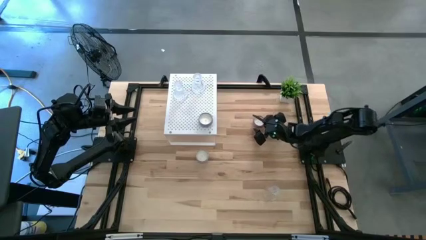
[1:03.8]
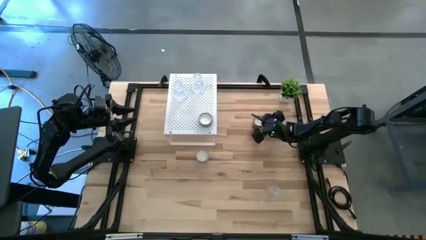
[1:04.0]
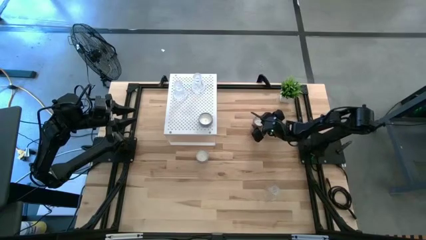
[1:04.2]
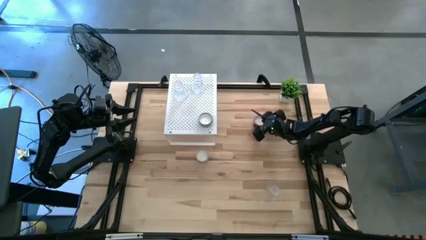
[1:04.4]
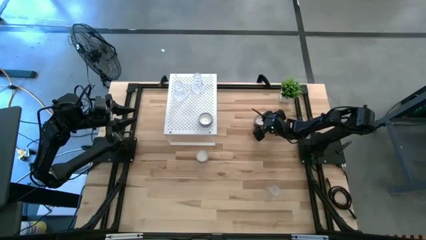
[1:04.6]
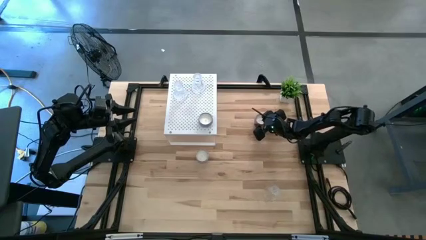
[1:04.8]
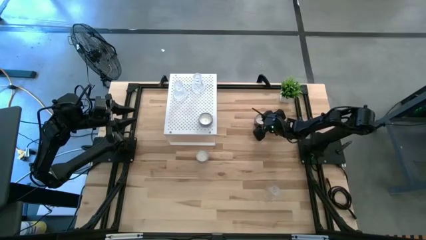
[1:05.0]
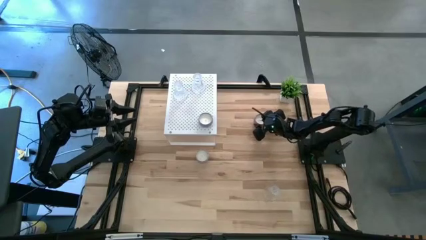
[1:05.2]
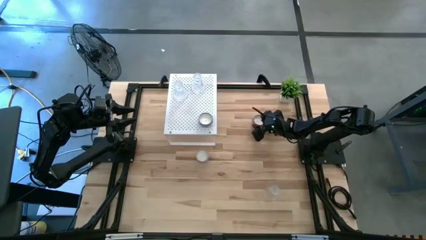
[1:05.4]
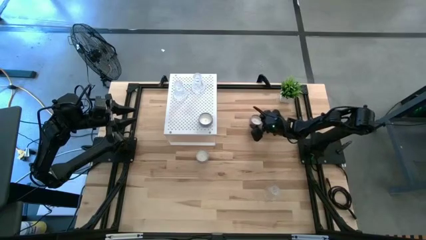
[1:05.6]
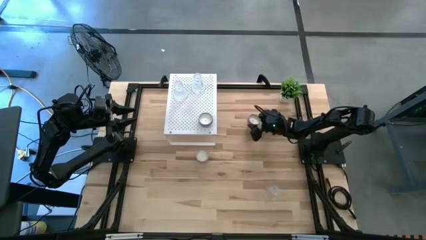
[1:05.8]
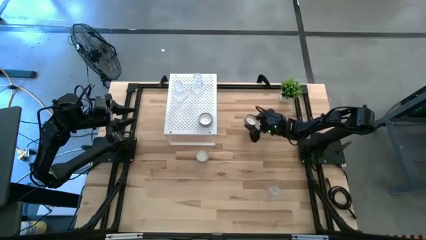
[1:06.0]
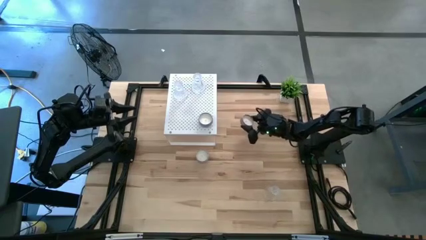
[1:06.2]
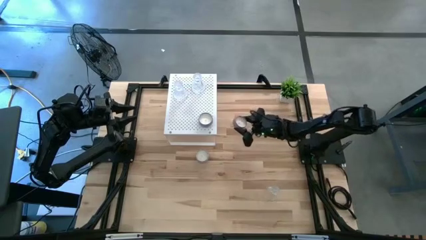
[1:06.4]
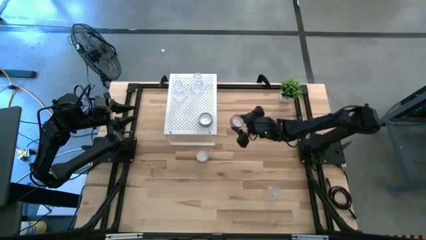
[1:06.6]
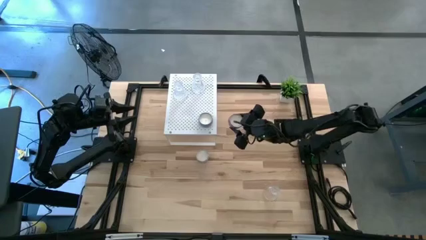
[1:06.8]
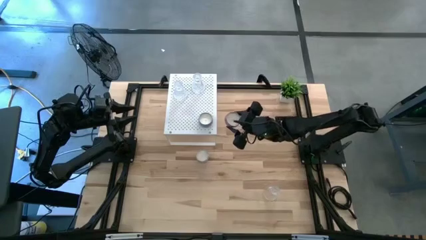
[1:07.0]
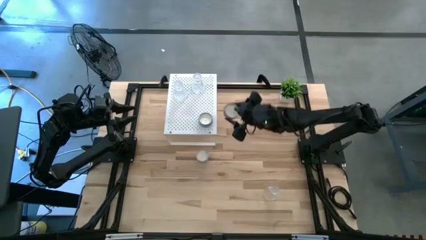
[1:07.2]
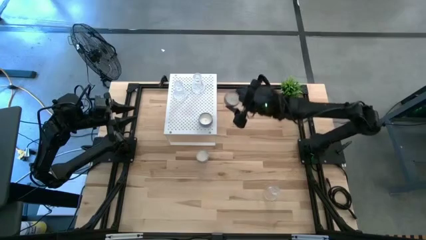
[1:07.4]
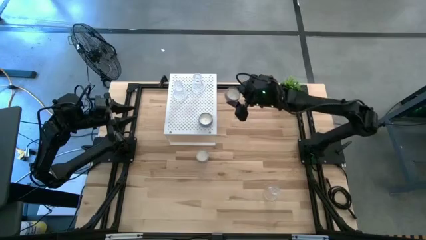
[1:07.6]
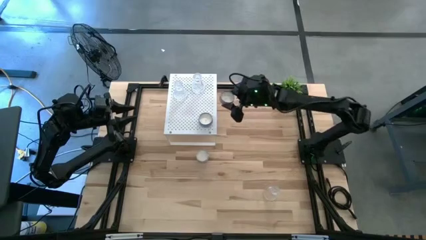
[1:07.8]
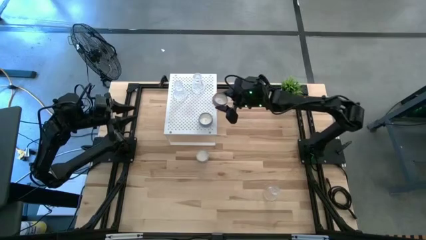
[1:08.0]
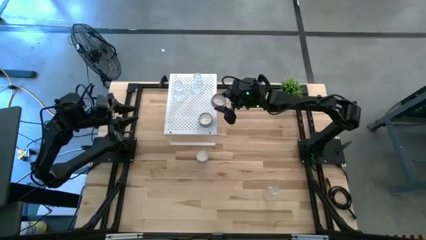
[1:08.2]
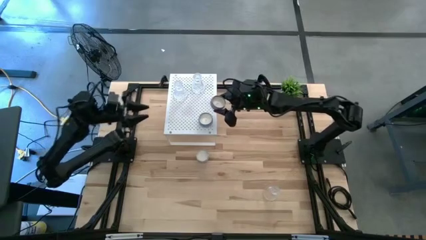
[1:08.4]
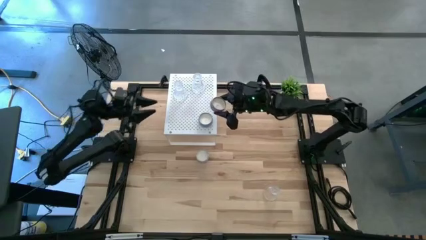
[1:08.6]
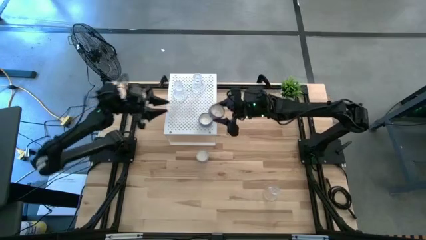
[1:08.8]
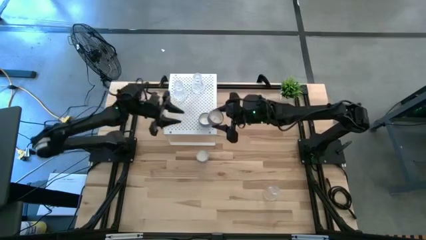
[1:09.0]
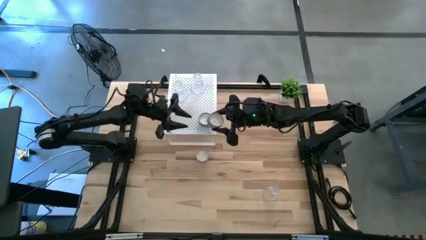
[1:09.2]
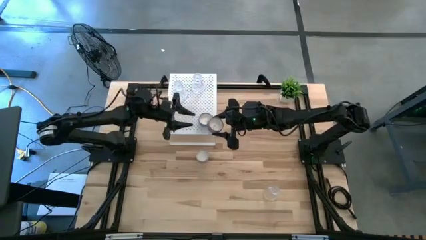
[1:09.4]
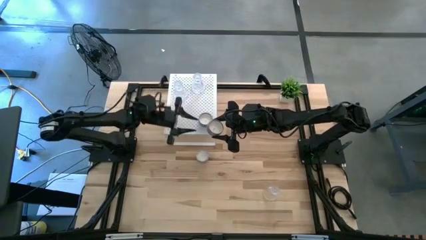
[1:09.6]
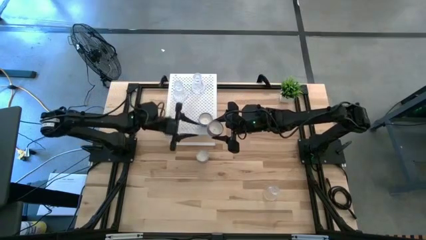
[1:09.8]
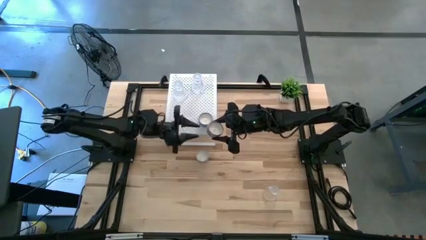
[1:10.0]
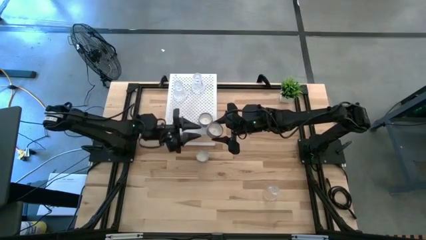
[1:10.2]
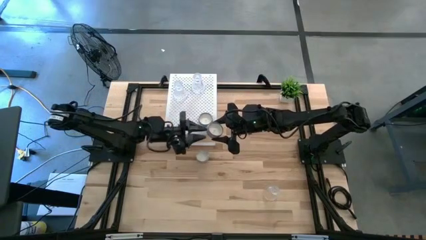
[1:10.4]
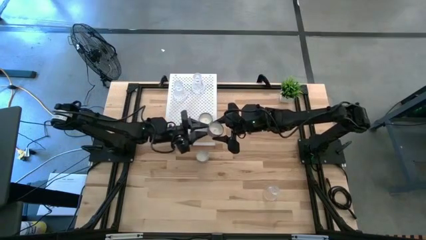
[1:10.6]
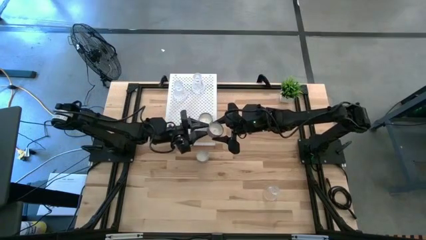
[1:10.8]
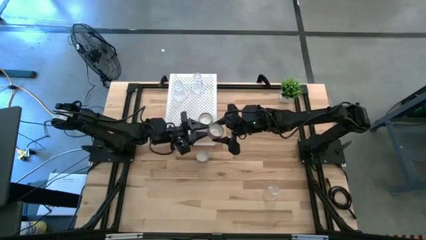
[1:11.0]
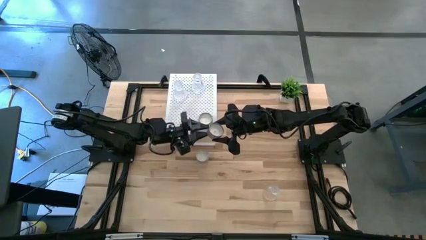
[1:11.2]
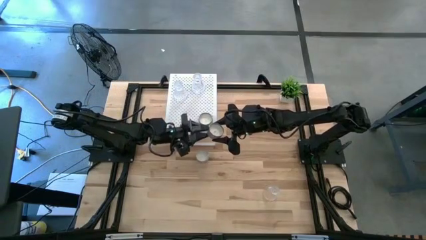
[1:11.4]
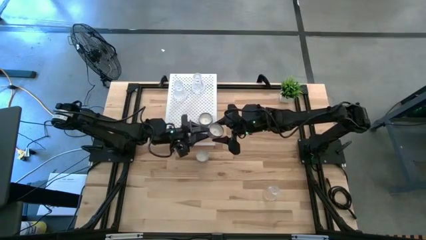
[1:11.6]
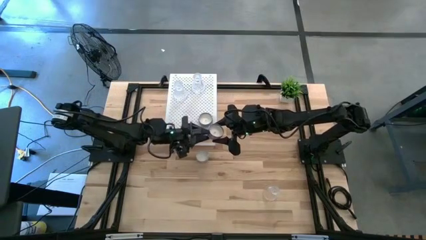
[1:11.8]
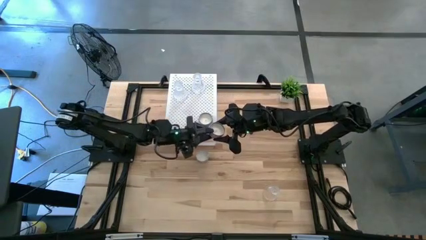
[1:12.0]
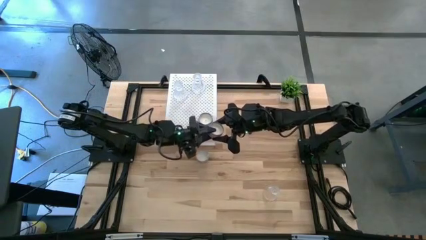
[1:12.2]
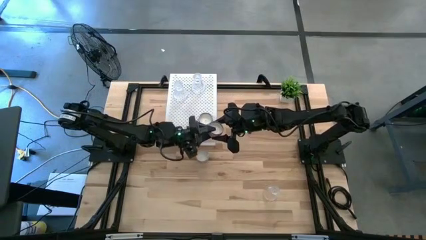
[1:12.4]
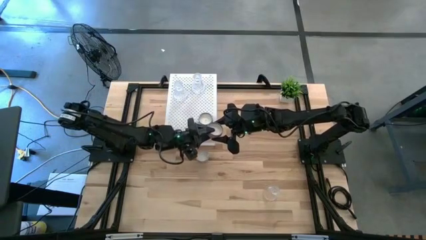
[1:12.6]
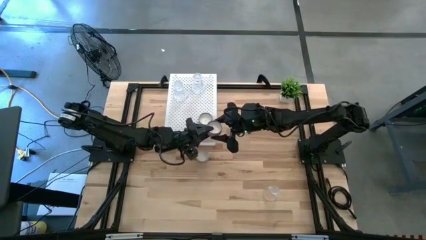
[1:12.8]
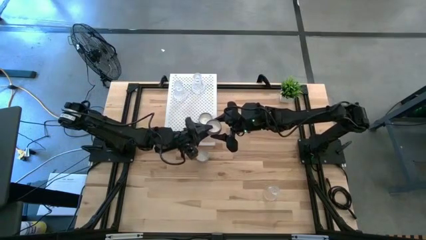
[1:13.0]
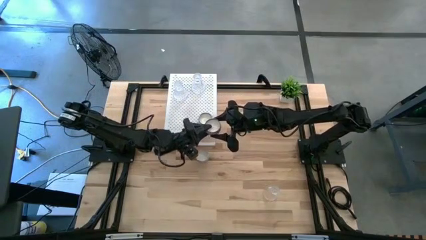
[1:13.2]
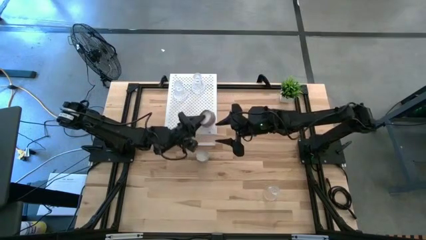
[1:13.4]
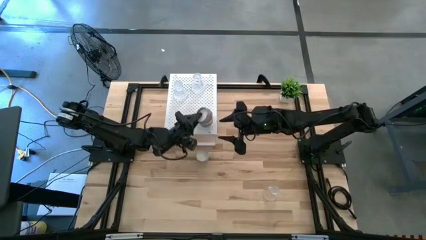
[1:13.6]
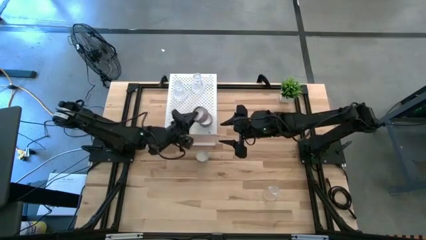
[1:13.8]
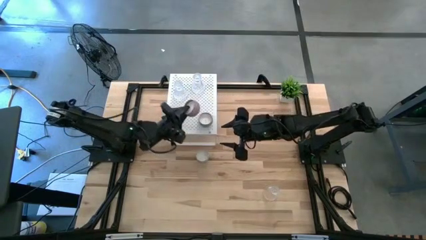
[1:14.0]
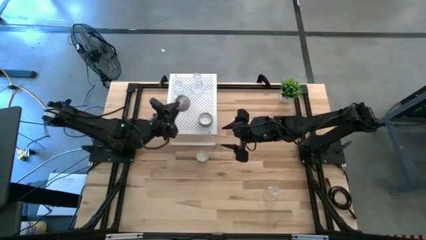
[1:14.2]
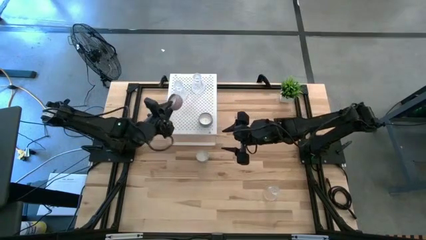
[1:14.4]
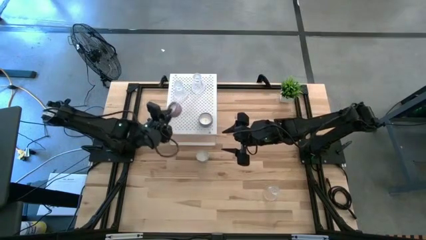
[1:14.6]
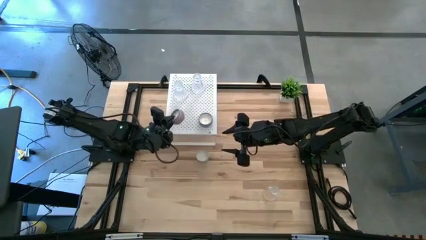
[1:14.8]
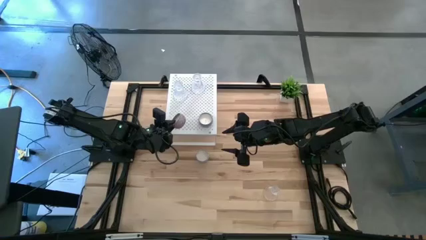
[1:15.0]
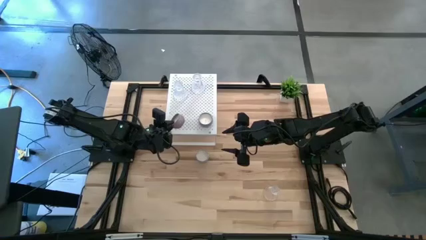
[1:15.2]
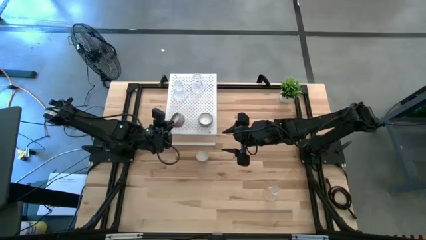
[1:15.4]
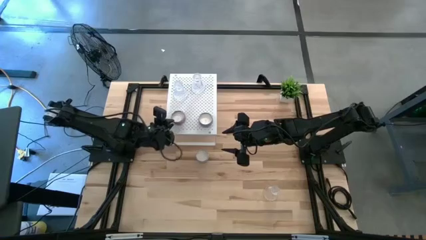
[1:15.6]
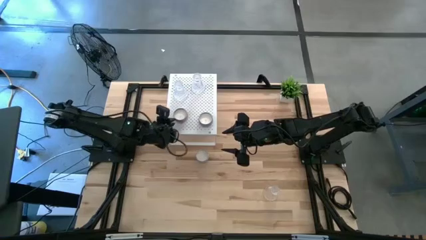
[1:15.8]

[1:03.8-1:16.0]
Task: Pick & Place candle stick holders
Put the violet candle on the shelf

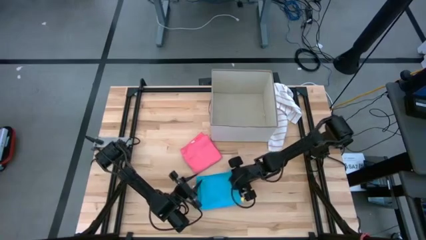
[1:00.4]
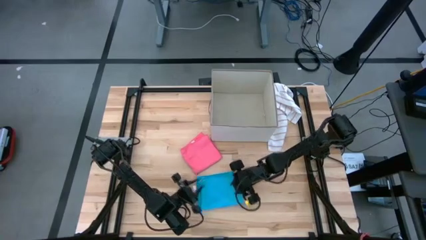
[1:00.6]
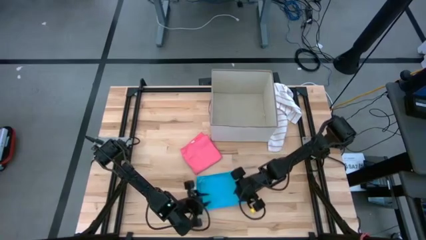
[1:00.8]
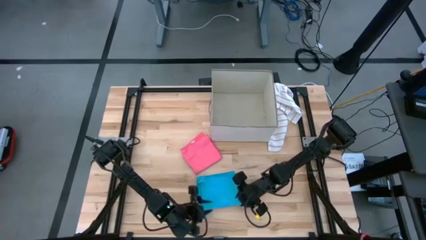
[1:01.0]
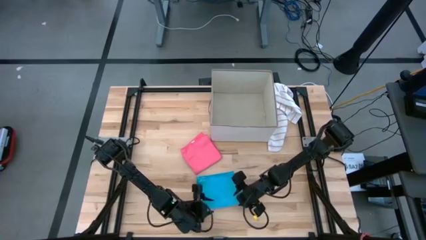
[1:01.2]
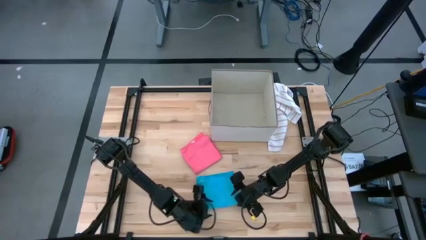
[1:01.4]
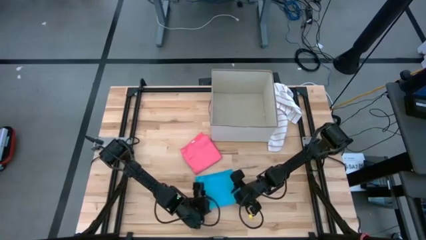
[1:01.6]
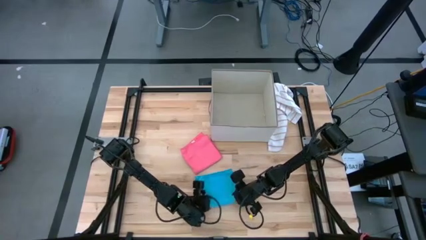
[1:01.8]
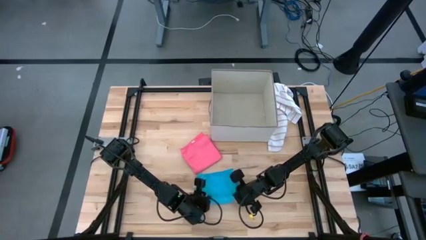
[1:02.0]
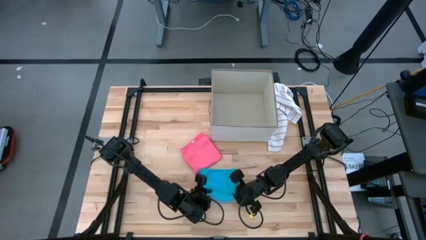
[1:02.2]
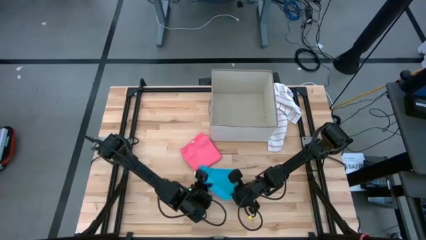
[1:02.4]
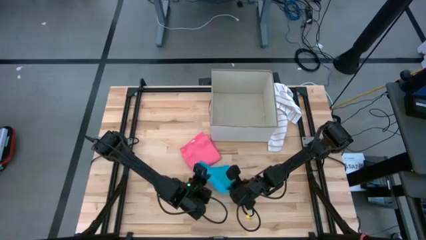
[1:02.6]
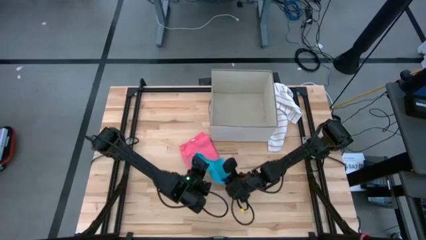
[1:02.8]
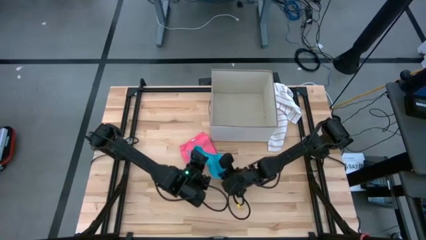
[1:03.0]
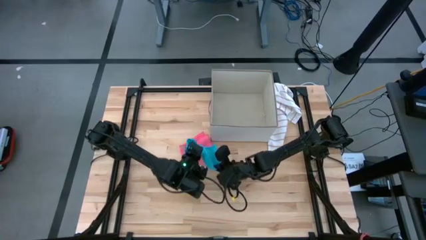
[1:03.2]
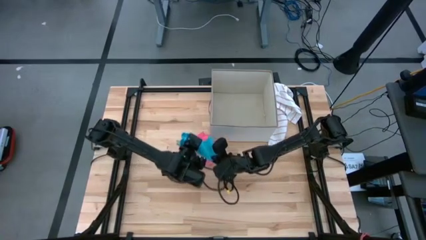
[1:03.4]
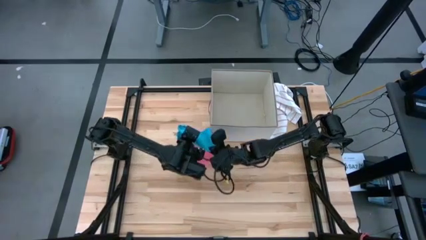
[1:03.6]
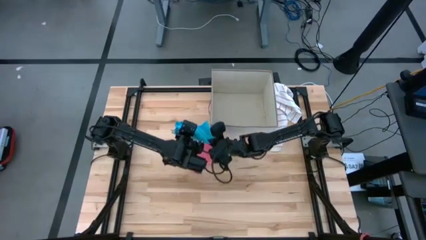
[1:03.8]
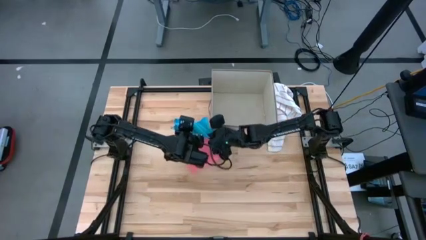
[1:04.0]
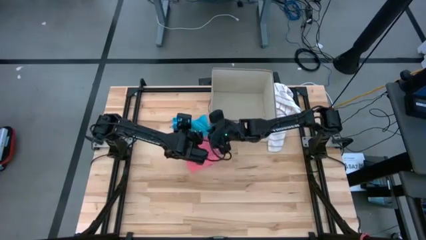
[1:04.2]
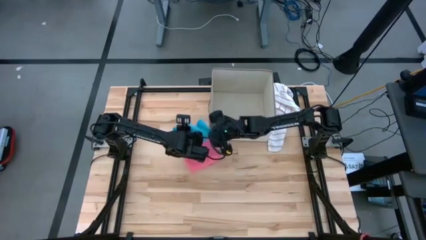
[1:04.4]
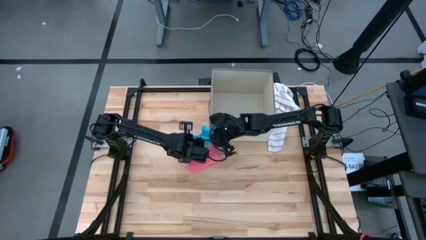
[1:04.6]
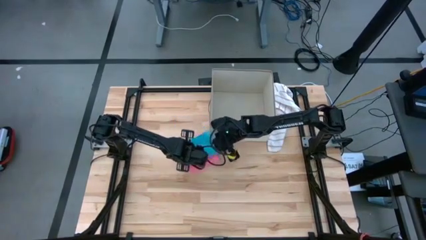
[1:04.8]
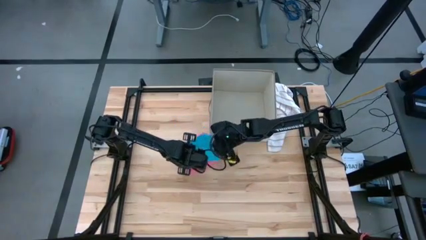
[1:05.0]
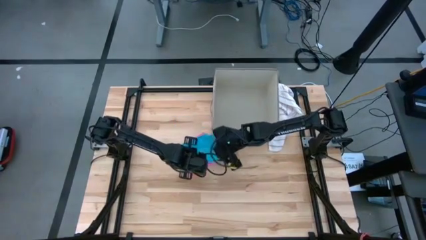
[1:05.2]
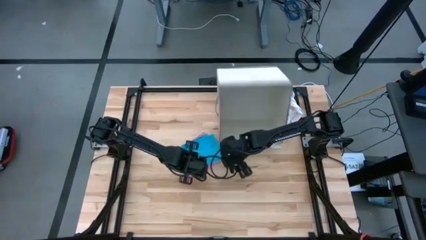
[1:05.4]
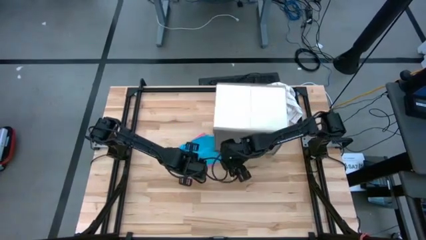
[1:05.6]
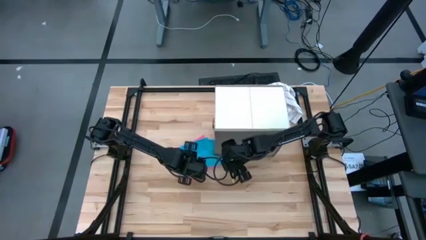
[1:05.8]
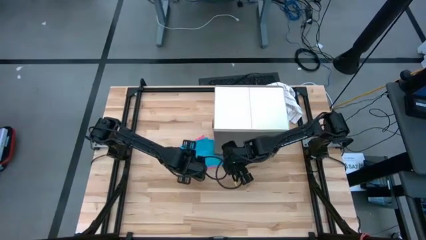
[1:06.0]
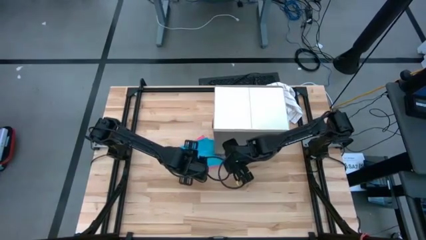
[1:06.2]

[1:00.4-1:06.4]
Task: Fold towel
Stack the blue microfiber cloth on top of the pink microfiber towel
